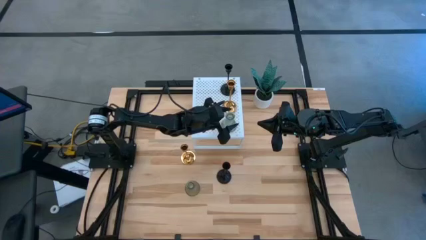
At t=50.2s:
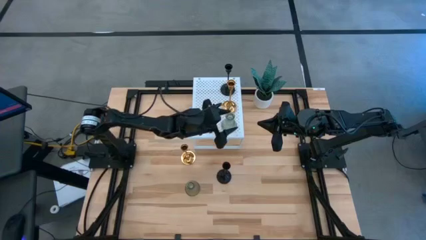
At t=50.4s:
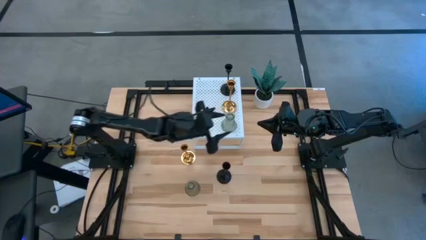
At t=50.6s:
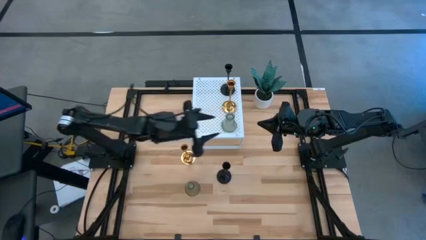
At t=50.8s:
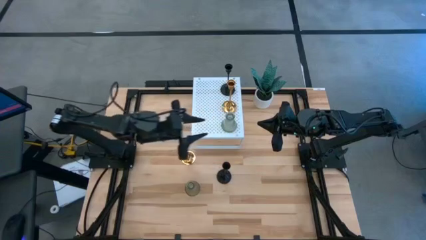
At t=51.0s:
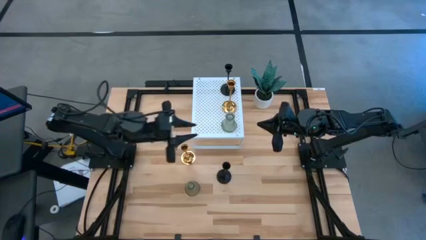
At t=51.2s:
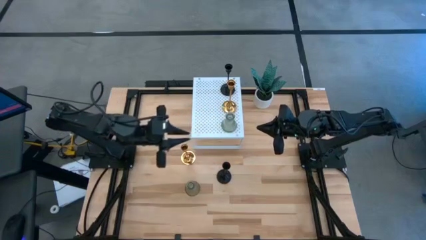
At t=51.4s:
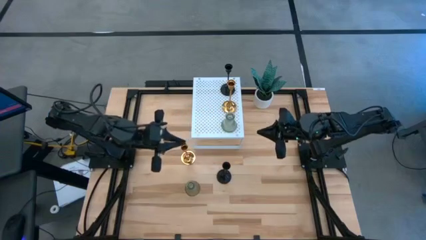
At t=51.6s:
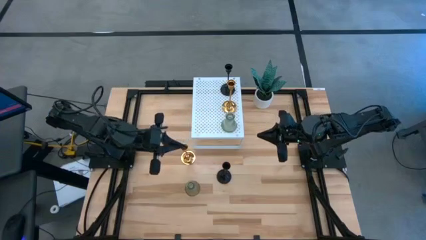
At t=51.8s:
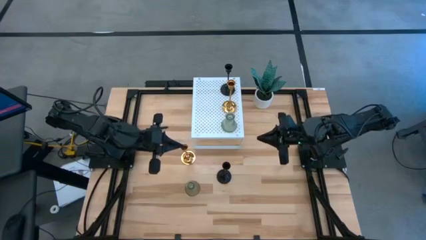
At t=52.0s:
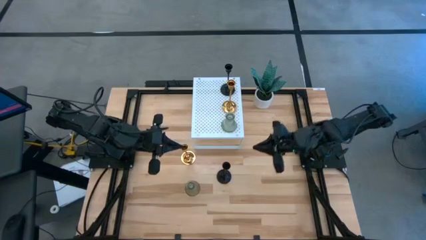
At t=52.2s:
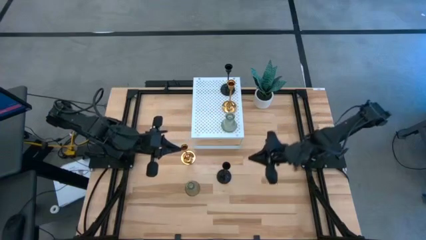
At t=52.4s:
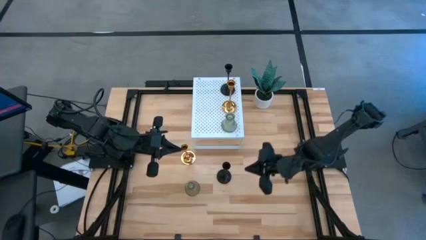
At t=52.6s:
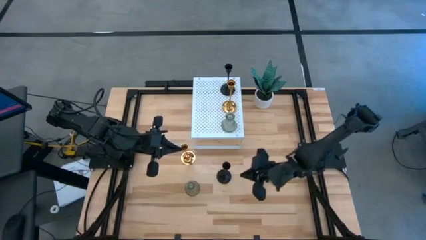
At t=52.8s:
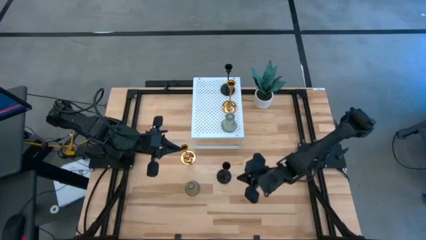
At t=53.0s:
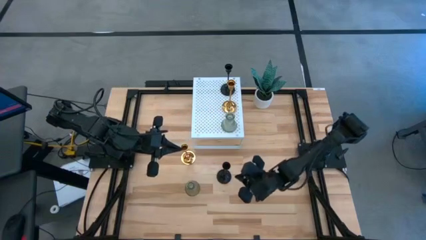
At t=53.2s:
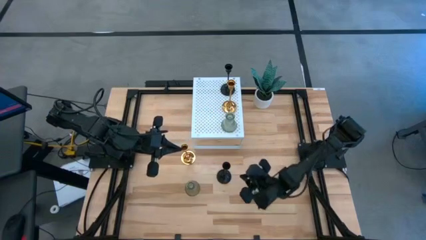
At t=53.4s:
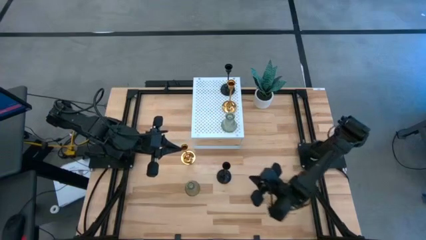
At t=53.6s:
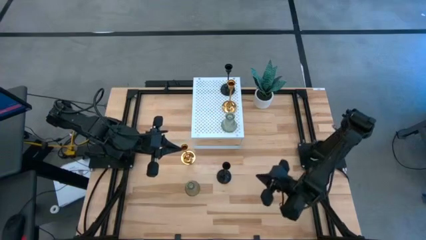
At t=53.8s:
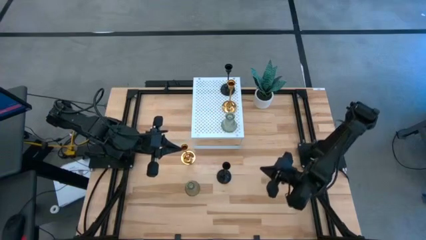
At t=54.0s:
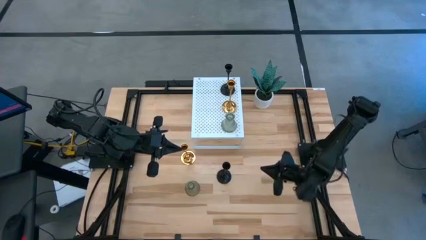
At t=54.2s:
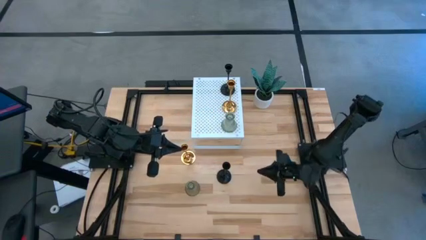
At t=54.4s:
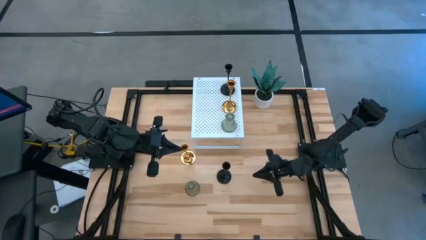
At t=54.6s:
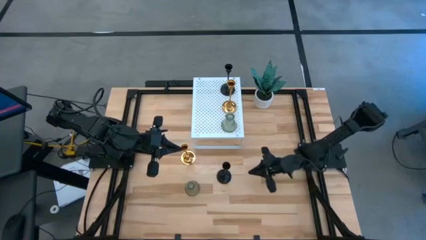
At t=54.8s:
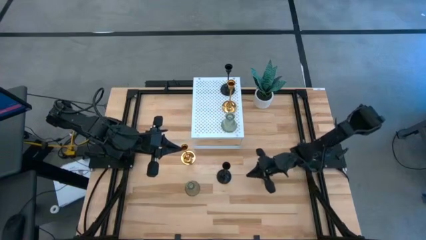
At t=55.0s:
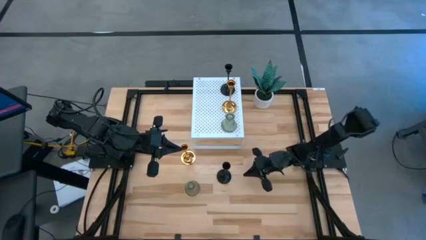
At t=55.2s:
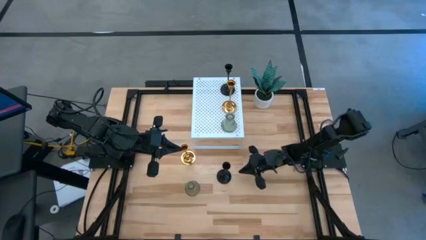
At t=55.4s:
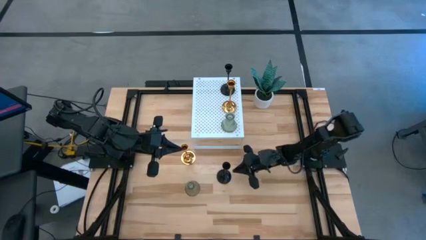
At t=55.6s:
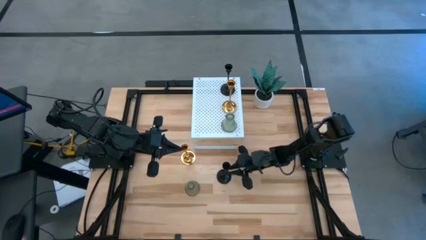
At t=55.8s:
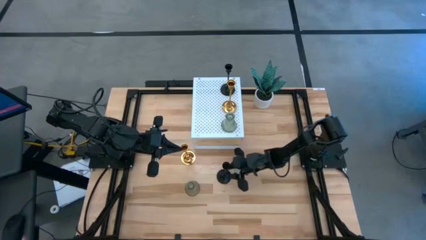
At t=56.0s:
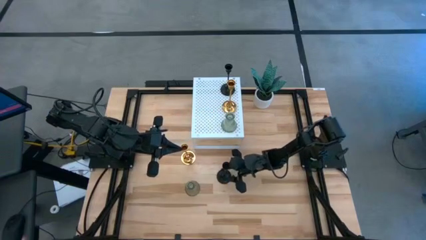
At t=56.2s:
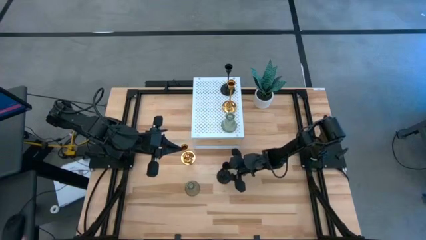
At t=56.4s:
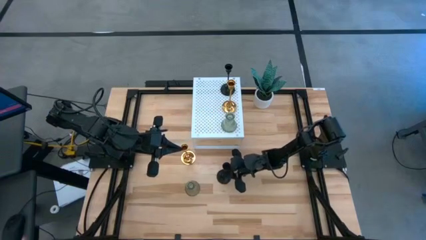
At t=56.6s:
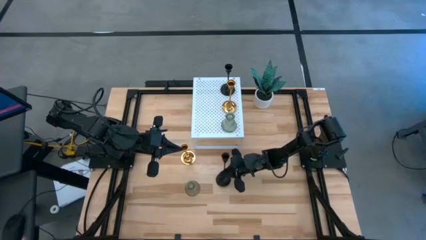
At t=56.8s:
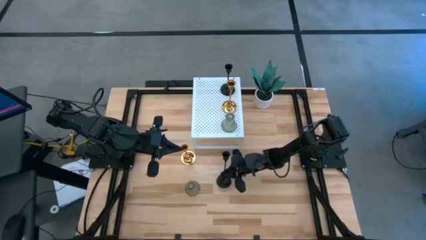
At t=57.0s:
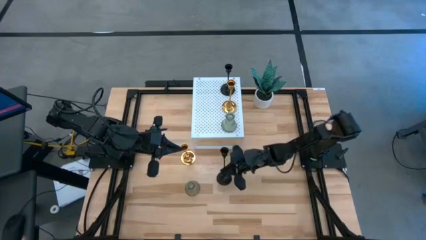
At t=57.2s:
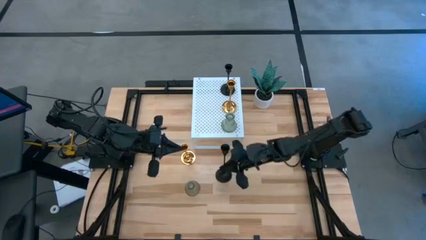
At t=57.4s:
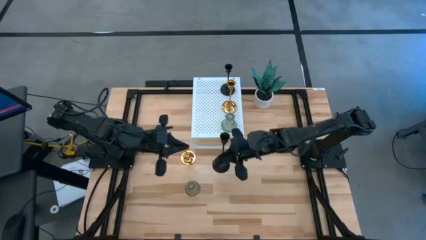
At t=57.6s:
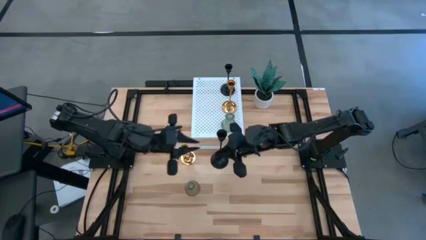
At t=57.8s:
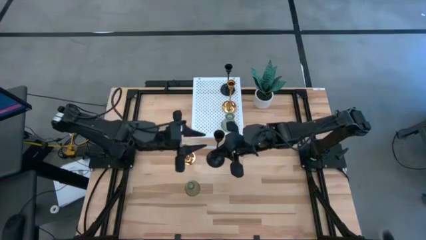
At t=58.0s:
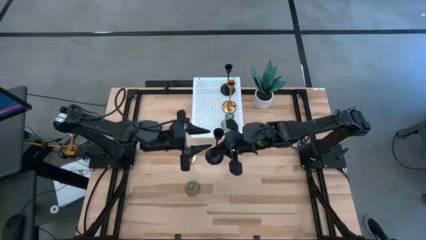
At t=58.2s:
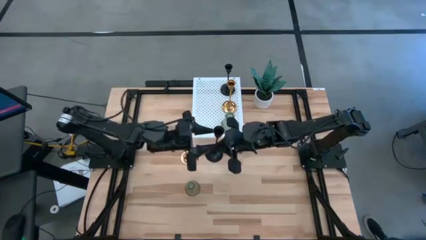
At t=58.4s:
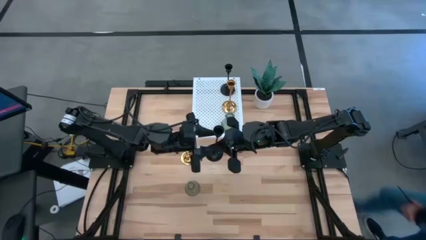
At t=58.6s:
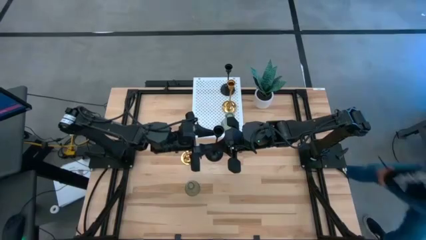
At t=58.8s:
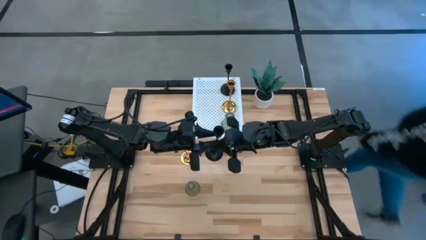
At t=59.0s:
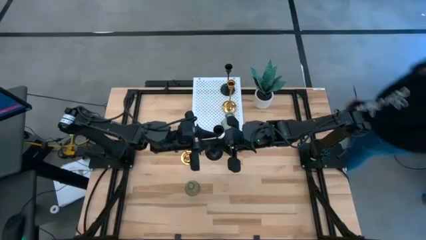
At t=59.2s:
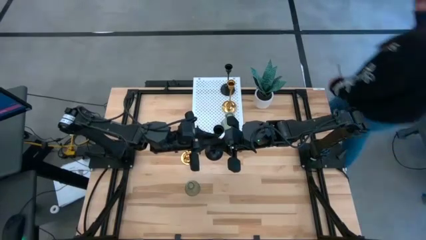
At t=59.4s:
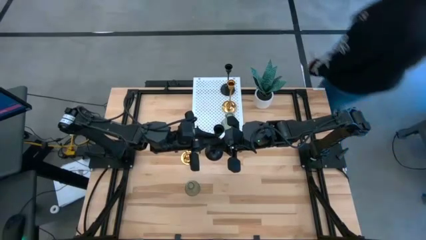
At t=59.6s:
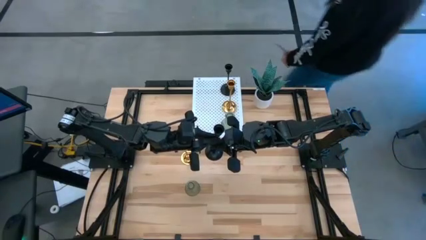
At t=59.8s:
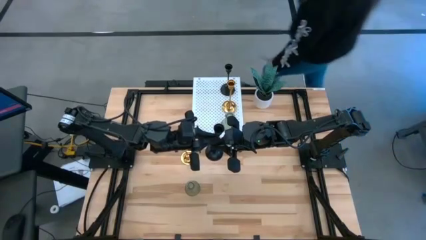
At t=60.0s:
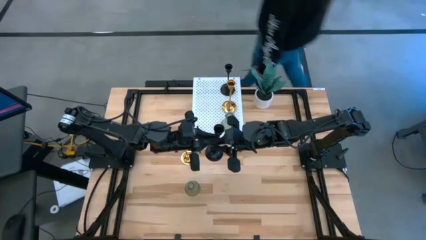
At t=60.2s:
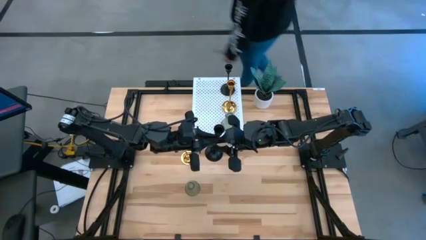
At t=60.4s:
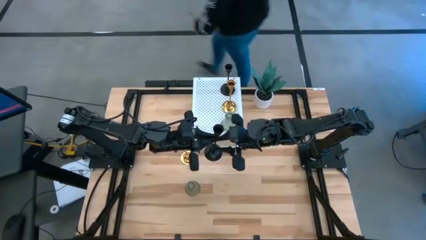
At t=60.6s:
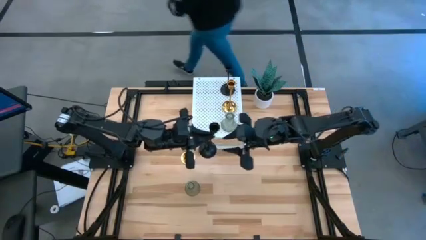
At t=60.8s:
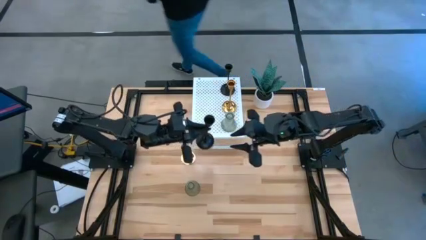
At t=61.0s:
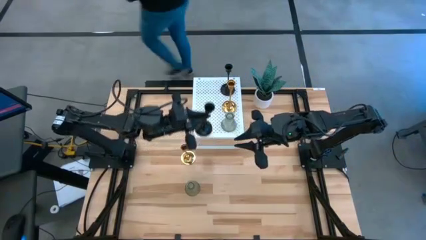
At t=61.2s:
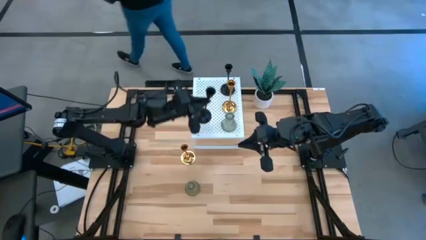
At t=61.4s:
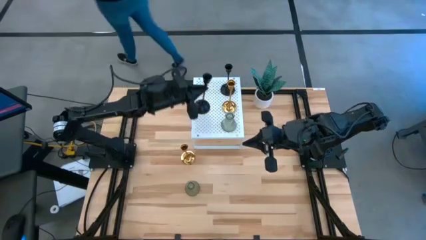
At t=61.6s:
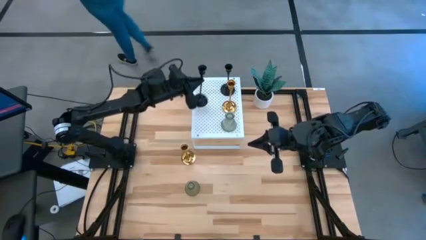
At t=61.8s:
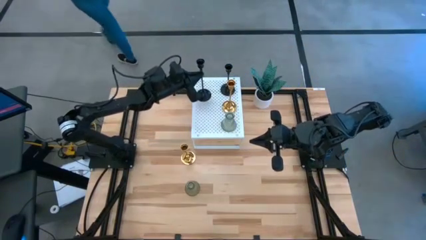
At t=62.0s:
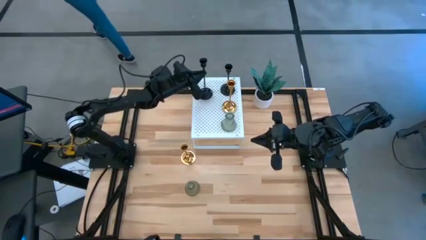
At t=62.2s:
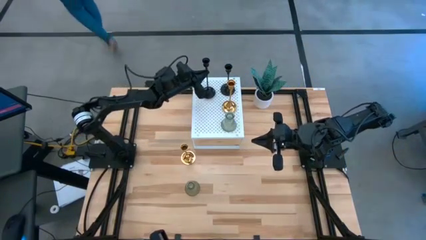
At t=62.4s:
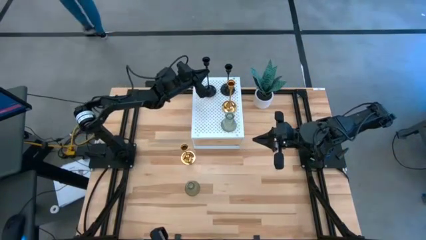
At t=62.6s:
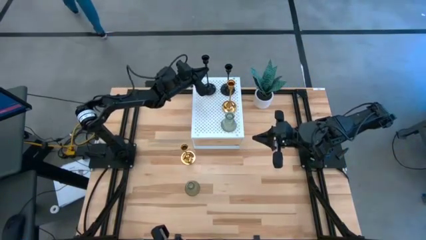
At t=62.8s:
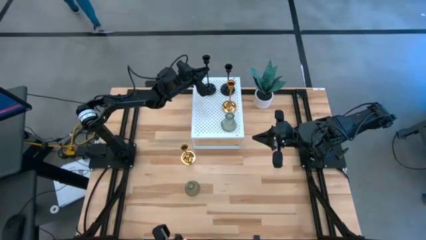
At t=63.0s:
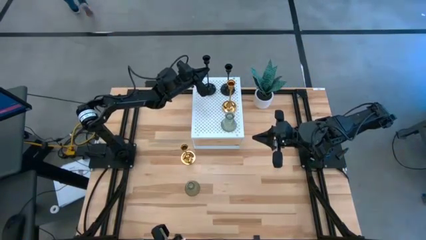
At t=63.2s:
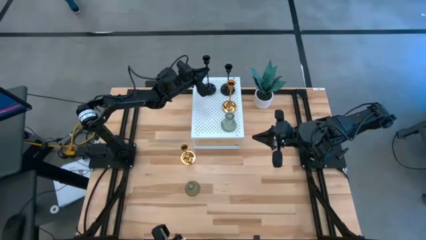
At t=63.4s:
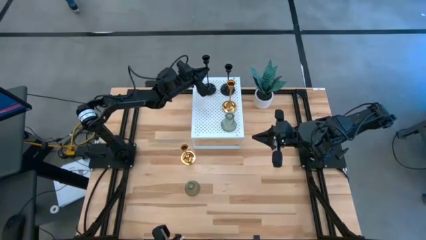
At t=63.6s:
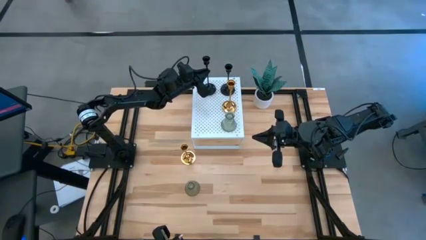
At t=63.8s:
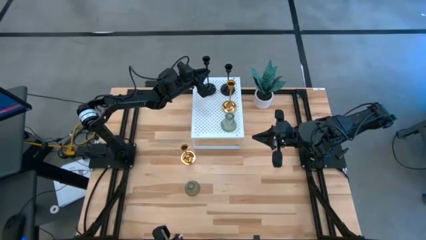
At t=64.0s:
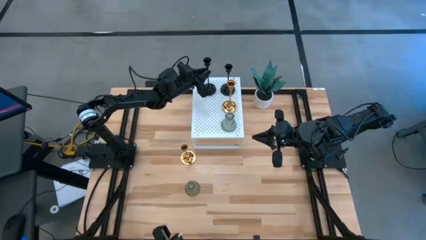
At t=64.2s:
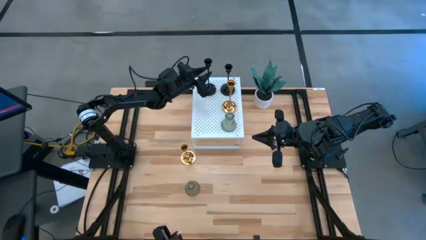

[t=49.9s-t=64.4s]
Task: Pick & Place candle stick holders
Put the black candle holder aligned with the other black candle holder on the shelf
